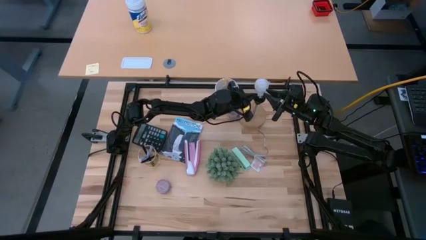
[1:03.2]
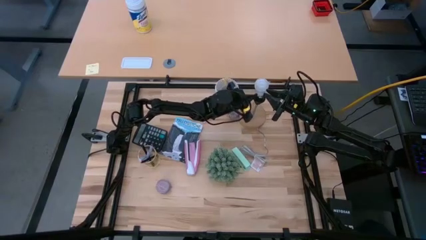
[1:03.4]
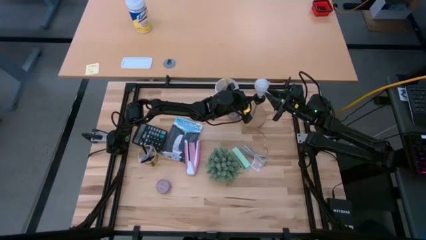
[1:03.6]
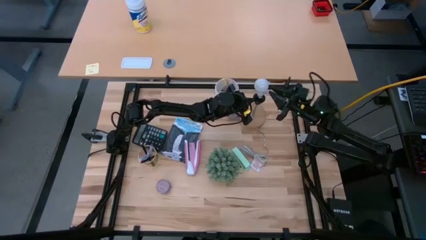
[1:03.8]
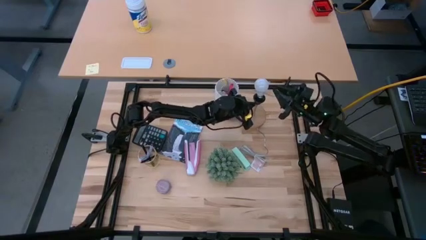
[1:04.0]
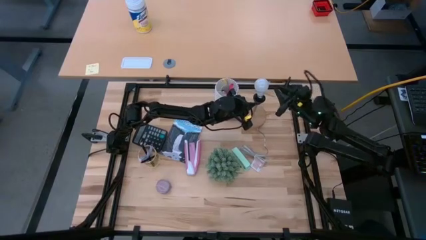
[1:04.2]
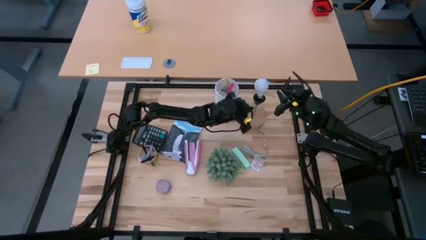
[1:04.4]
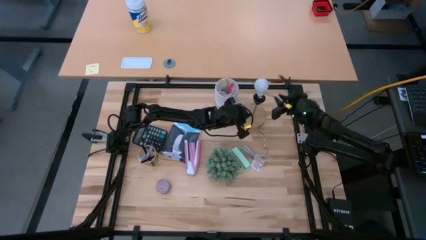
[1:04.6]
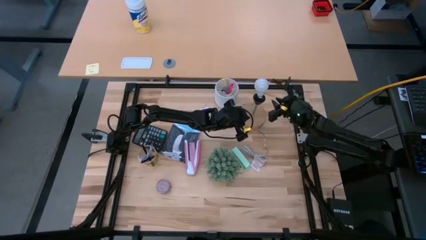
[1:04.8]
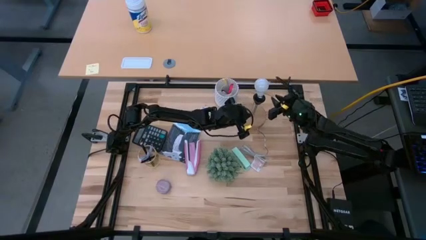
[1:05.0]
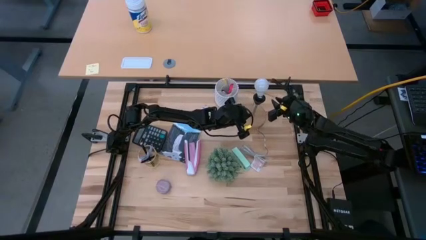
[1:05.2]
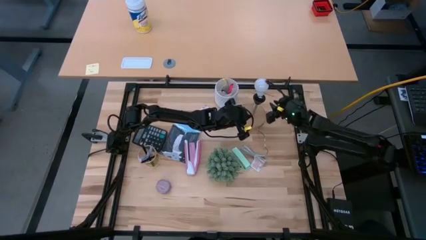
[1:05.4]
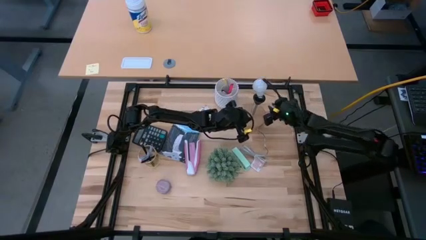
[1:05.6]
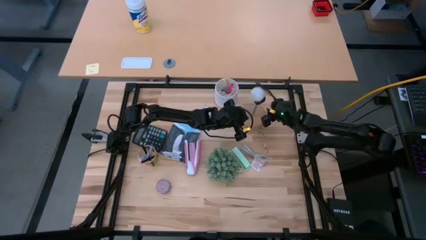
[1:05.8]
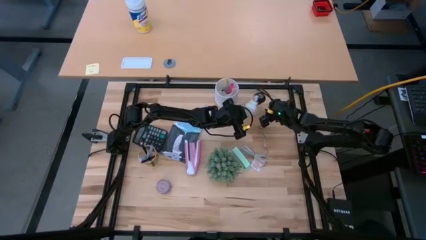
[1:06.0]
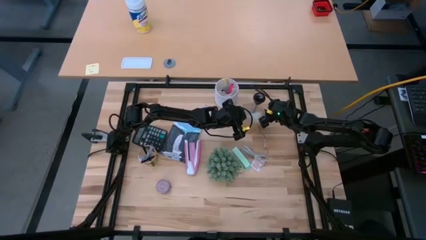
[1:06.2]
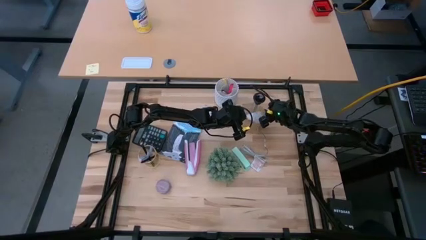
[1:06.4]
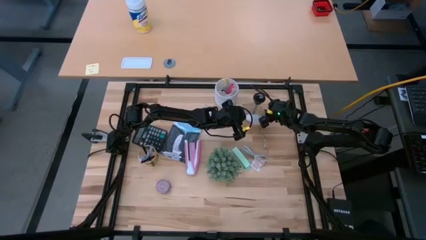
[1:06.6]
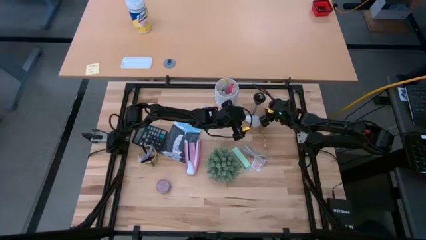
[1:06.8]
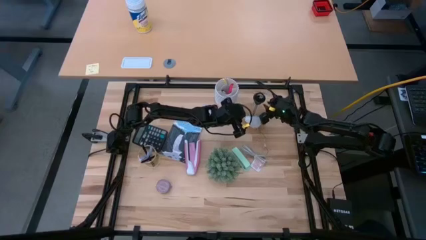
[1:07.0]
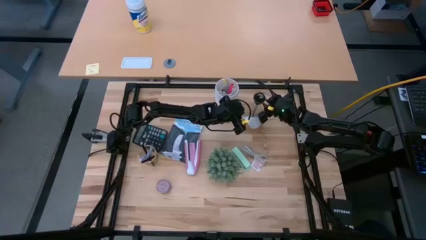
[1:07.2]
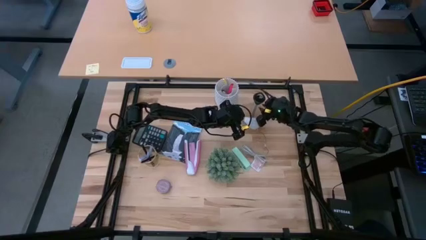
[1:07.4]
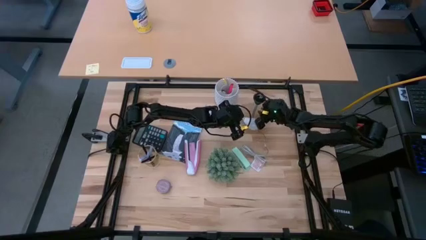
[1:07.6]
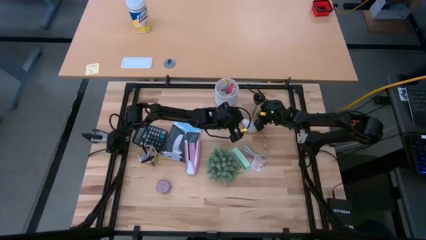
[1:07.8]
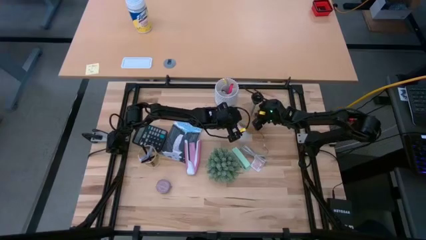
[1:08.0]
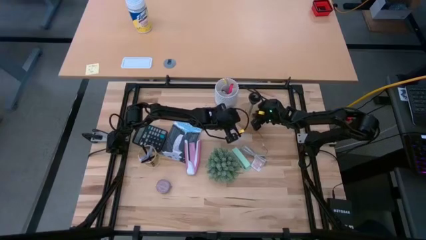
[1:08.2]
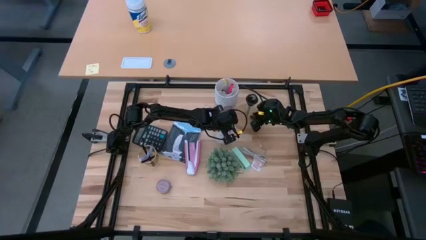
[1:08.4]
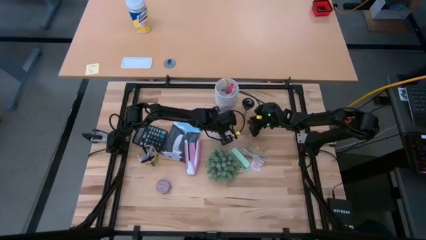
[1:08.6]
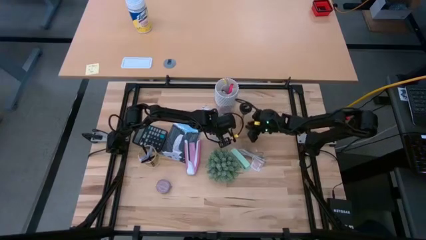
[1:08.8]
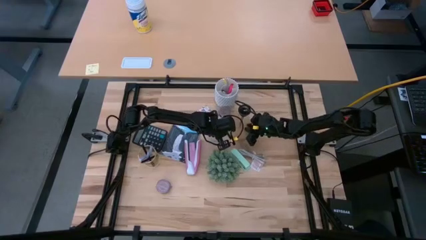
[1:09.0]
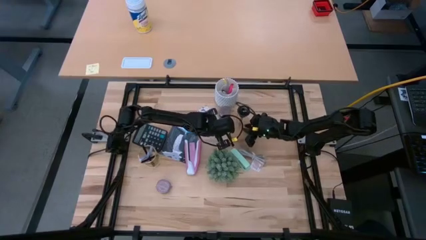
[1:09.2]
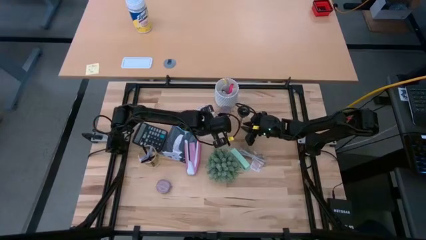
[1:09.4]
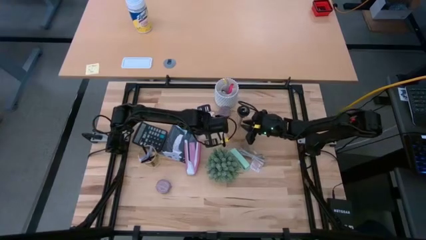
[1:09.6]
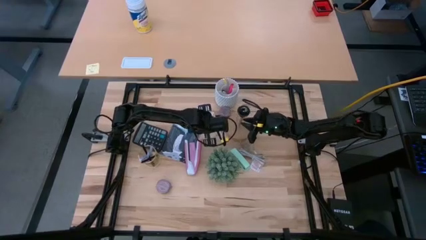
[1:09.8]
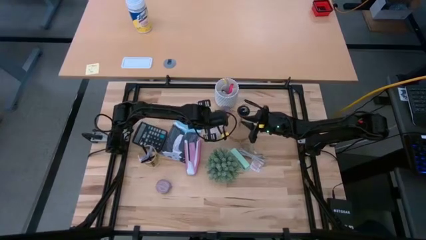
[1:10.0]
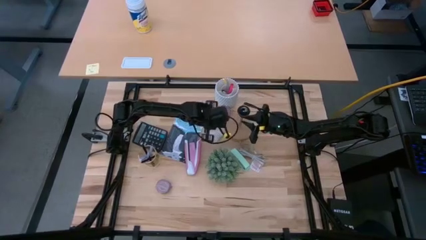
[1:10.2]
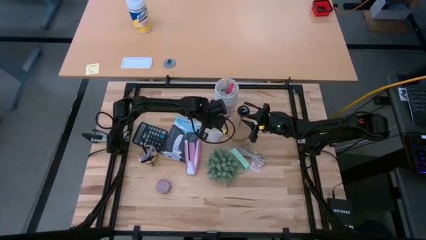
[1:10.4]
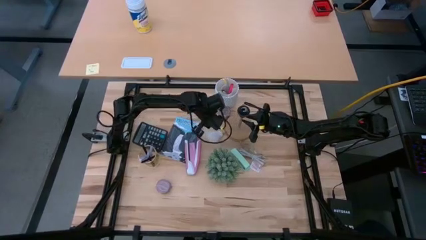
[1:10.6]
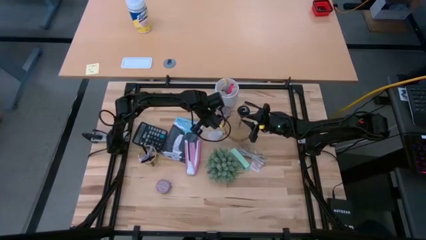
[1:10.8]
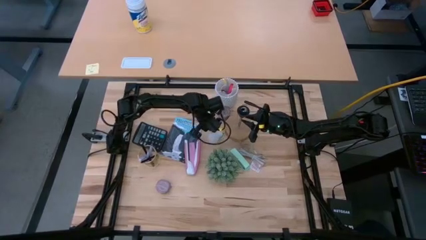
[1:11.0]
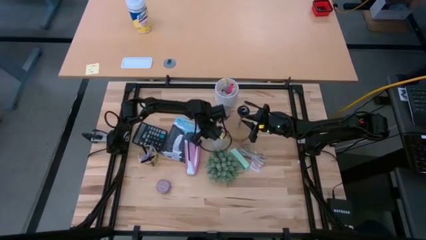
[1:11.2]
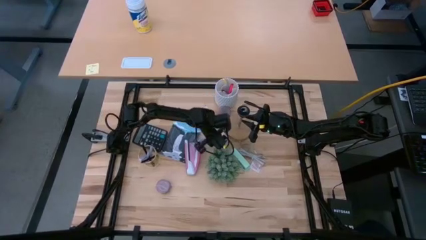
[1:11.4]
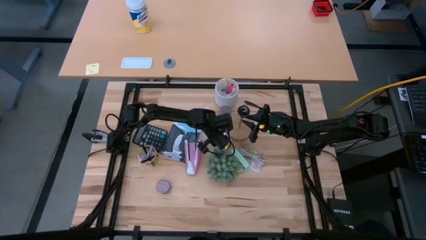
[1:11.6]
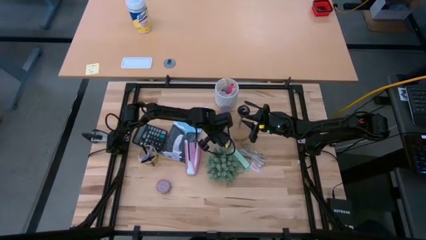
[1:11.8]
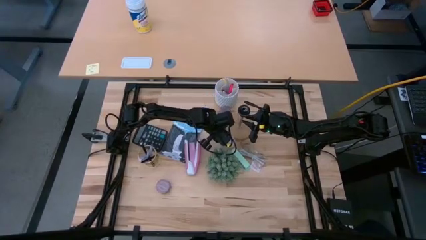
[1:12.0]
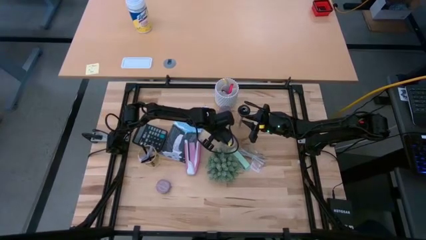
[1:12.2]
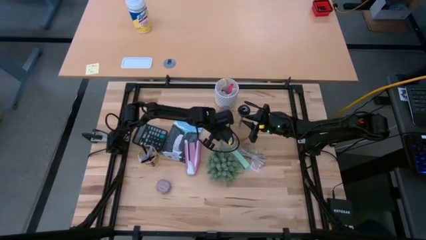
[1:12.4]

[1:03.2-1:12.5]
Task: Screw lightbulb
Insert the lightbulb into the lamp
